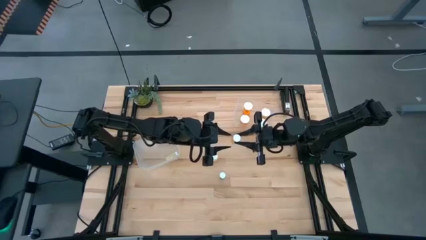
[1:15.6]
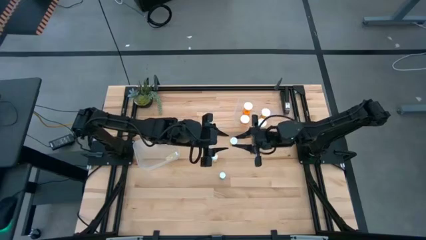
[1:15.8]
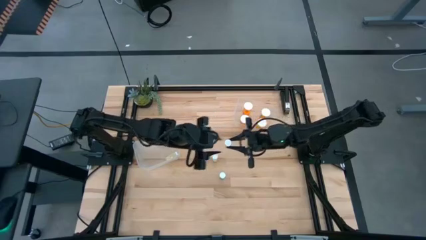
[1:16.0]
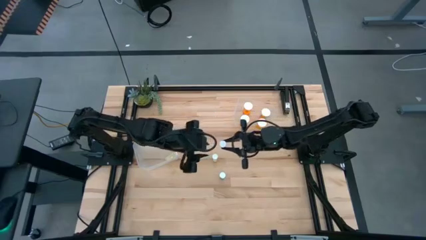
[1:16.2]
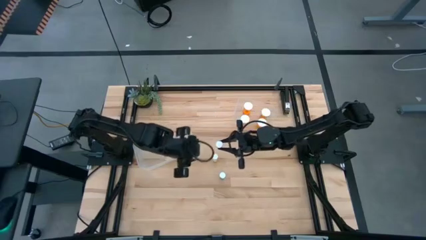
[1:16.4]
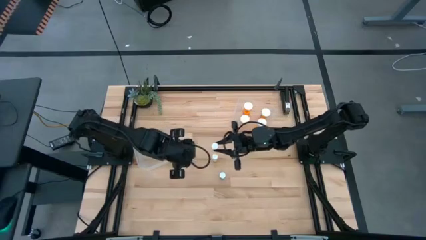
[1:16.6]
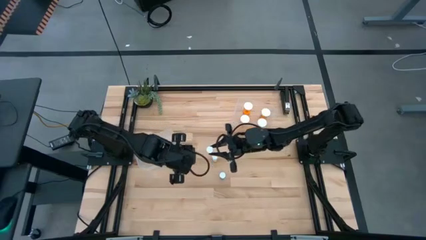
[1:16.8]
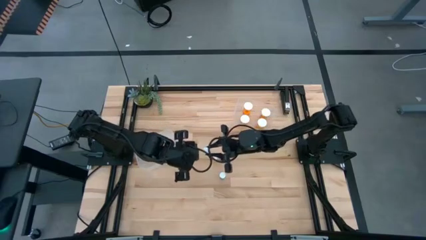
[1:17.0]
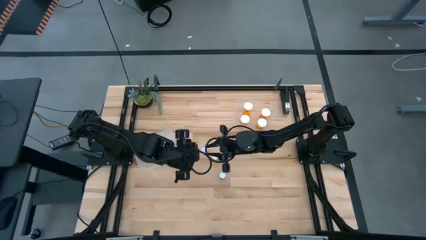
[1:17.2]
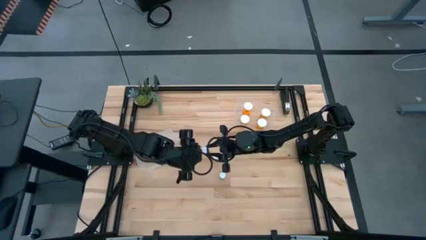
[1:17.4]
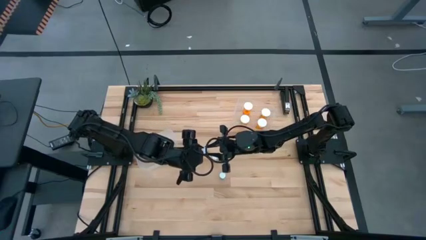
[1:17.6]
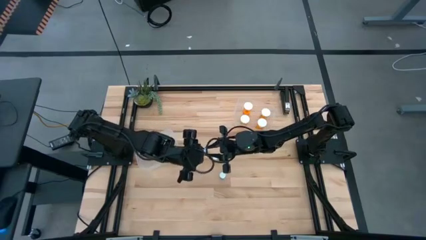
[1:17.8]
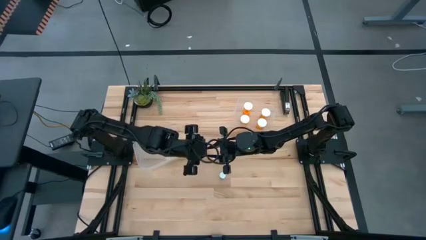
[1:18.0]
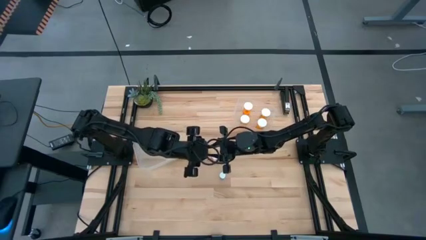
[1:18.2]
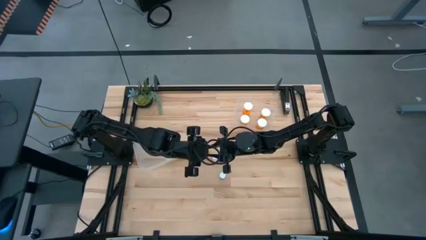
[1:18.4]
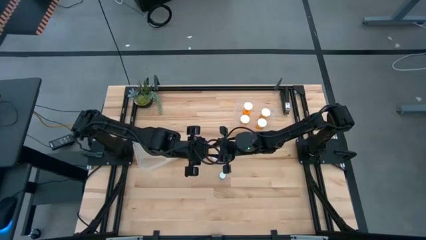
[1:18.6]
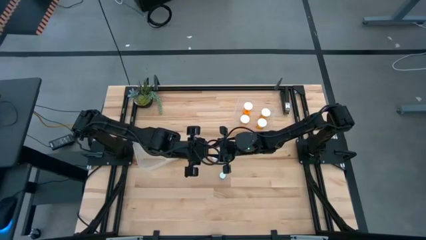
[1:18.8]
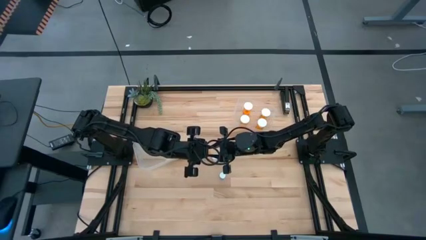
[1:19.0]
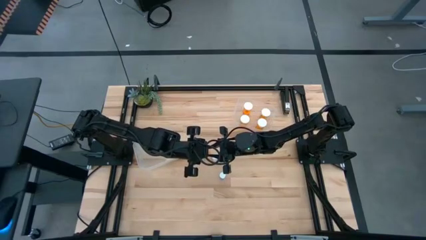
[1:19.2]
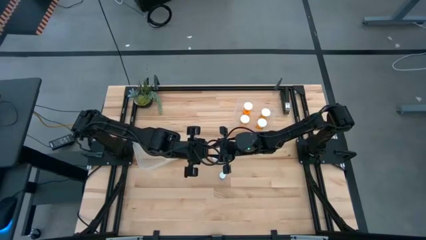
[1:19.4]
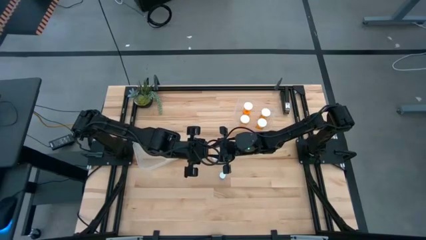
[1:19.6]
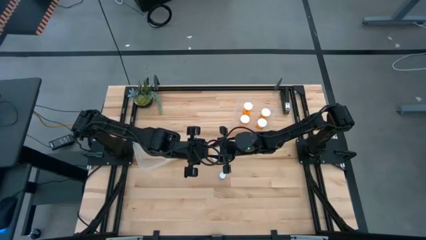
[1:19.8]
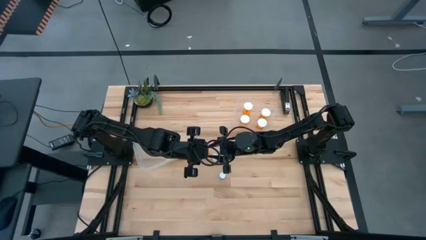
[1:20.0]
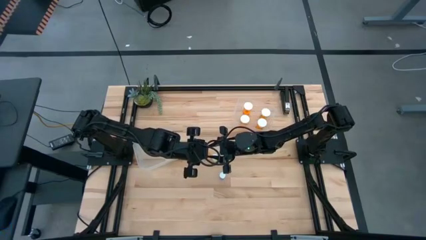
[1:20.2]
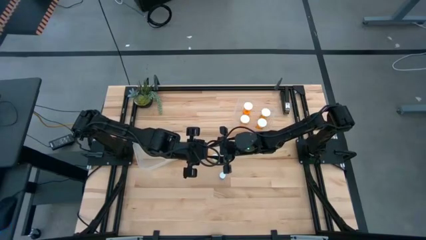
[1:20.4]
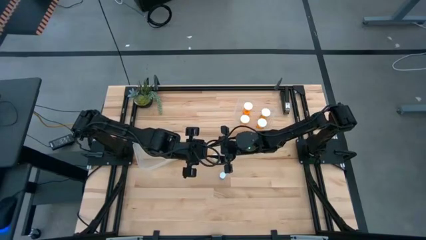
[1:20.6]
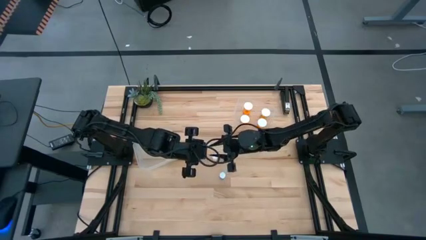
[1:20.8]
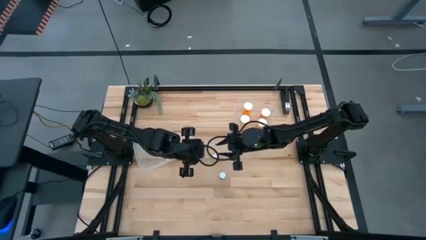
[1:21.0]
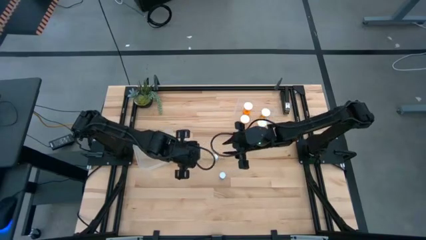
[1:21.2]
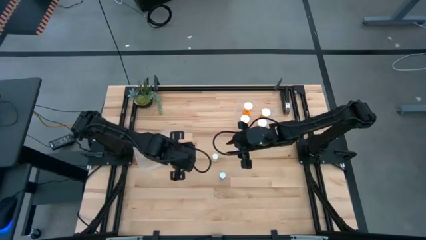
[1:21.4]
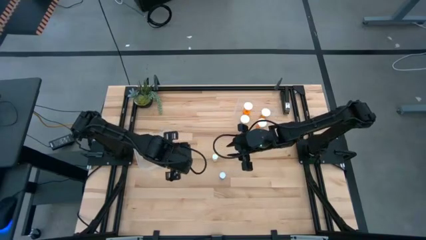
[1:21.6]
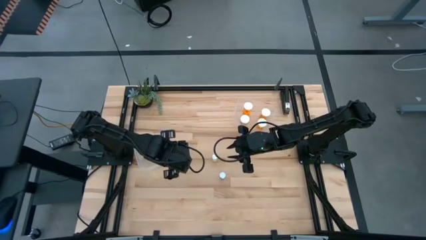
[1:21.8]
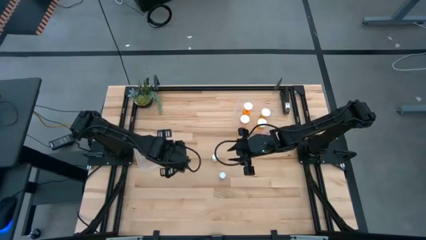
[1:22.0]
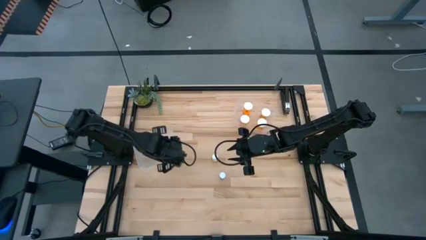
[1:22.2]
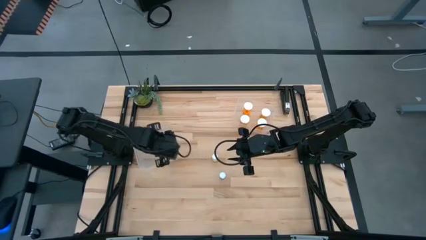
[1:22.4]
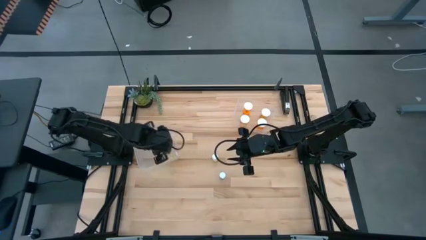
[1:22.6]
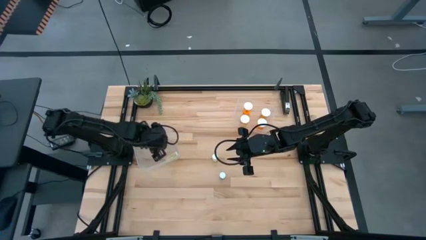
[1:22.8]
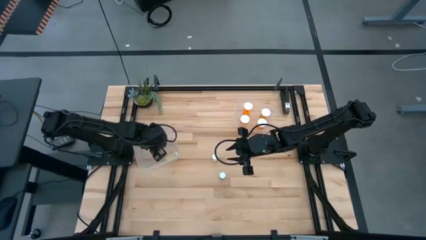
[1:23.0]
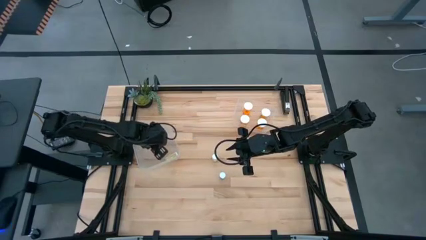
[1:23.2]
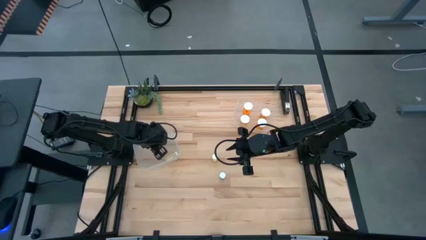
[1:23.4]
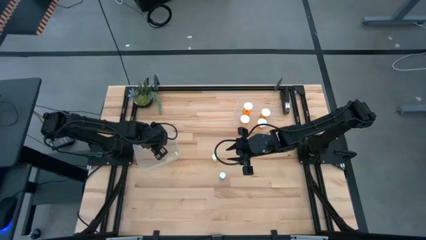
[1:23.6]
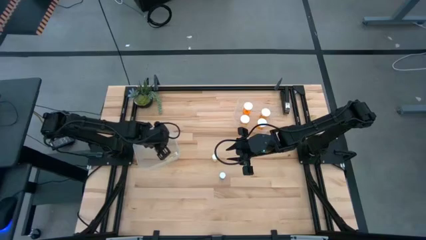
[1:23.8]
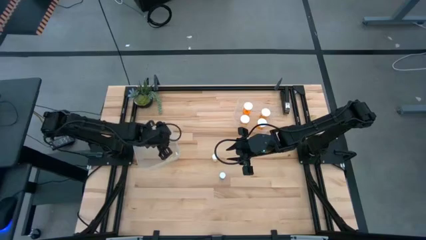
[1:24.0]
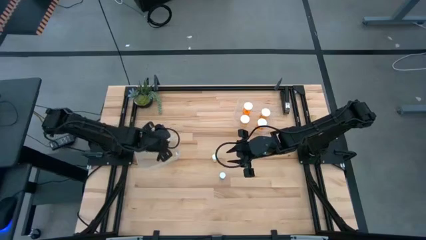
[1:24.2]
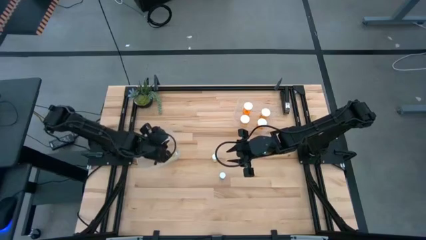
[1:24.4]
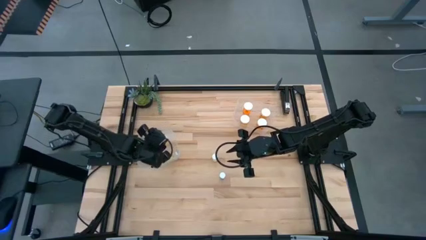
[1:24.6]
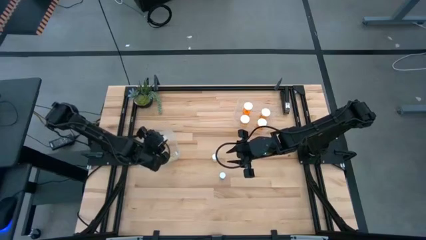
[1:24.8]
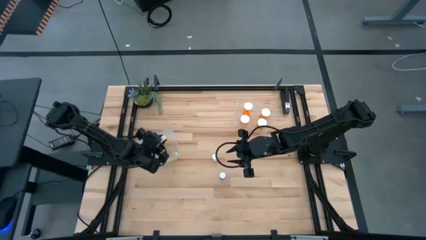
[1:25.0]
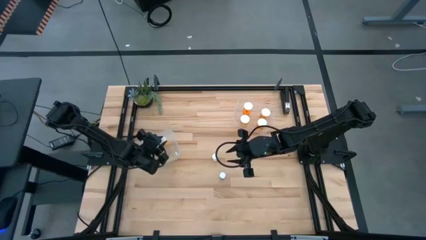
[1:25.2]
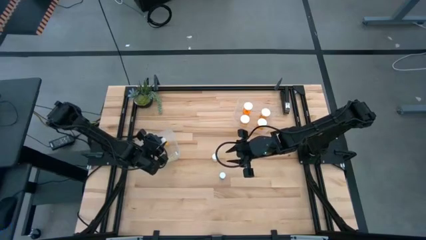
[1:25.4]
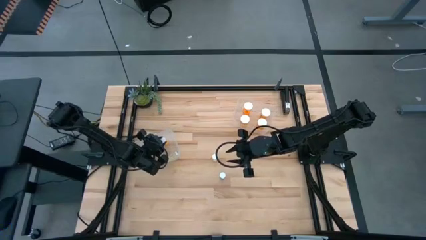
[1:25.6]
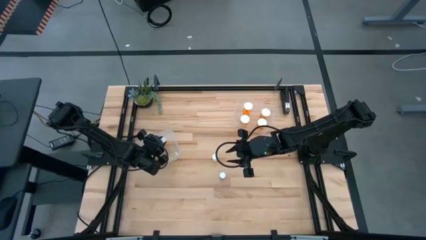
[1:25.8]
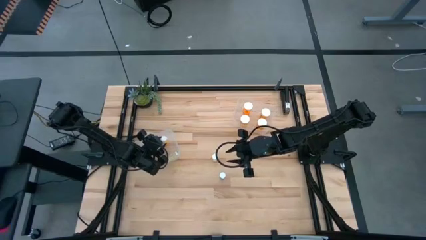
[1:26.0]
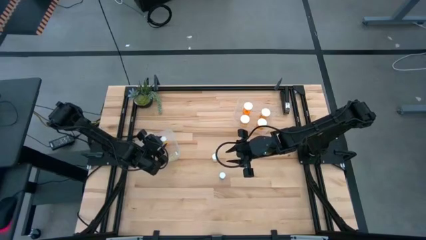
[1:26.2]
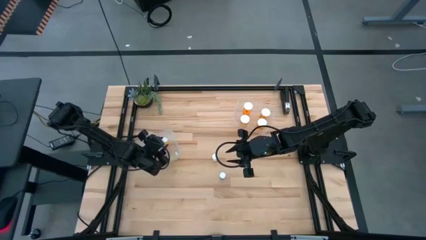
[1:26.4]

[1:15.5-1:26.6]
Task: Pick and place medicine bottles into bin by pill shape (circle, oval)
Adjust the small orange pill bottle in the left transparent bin

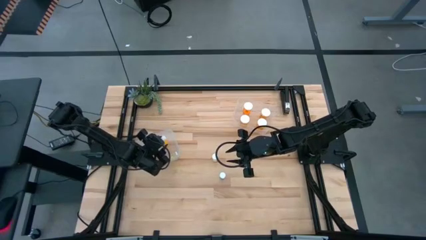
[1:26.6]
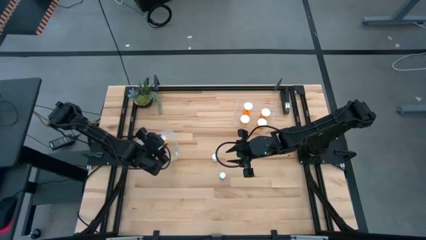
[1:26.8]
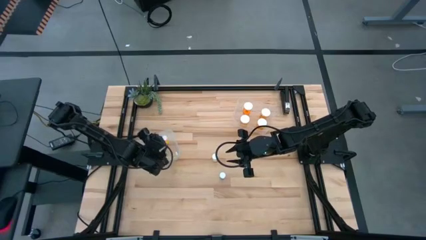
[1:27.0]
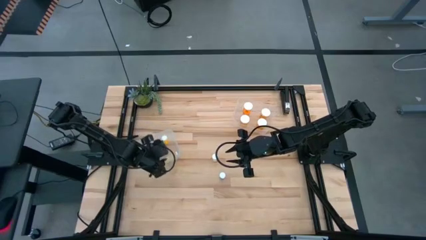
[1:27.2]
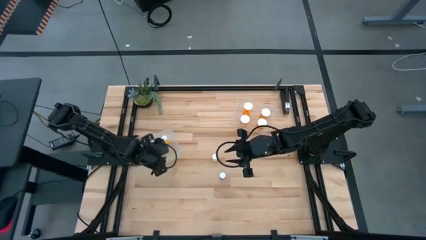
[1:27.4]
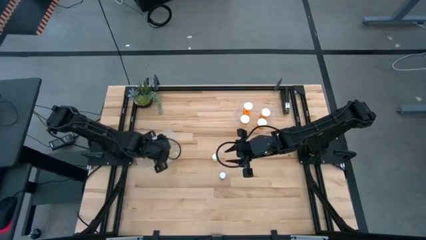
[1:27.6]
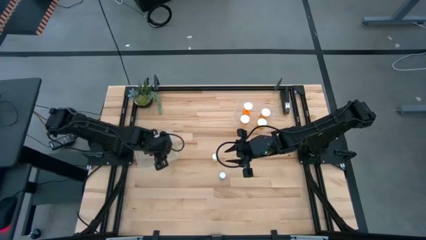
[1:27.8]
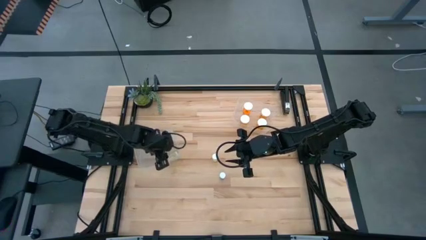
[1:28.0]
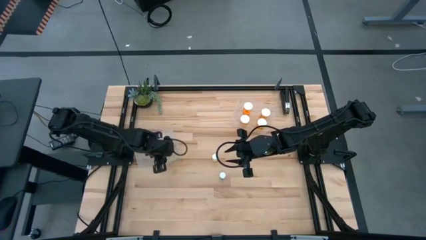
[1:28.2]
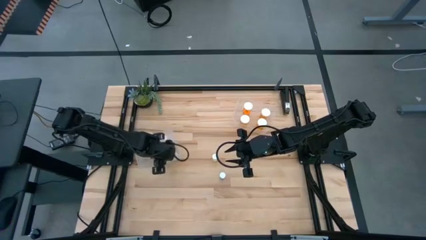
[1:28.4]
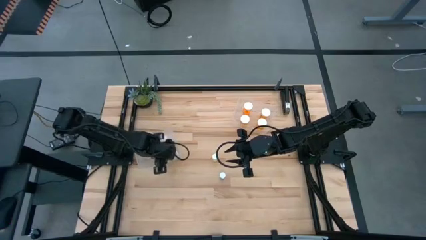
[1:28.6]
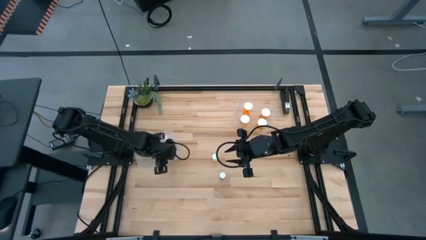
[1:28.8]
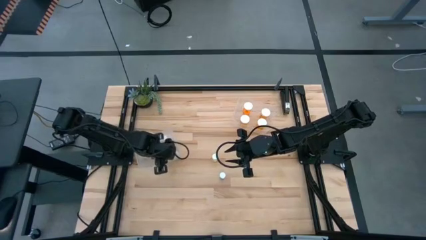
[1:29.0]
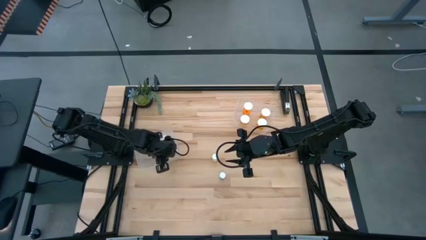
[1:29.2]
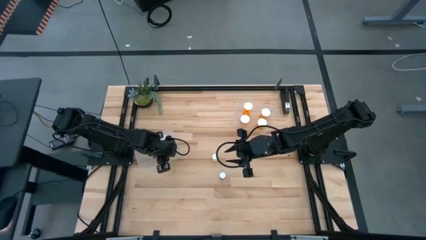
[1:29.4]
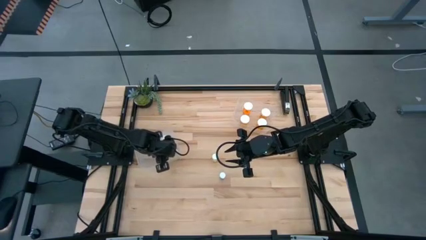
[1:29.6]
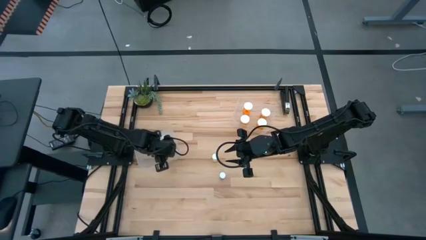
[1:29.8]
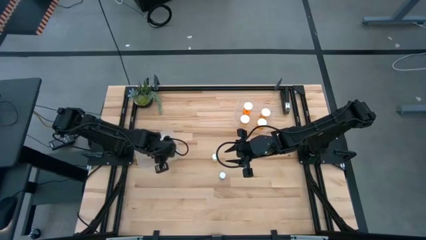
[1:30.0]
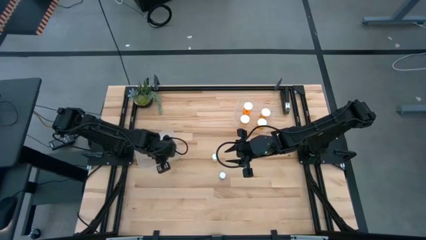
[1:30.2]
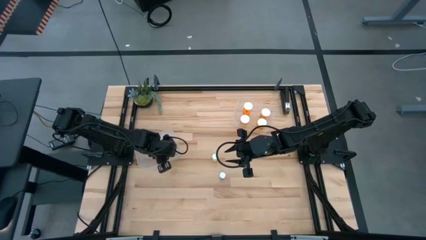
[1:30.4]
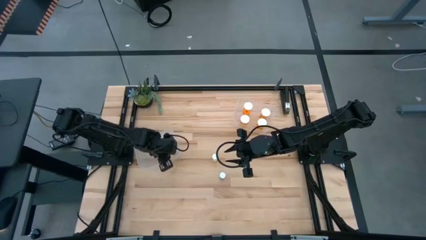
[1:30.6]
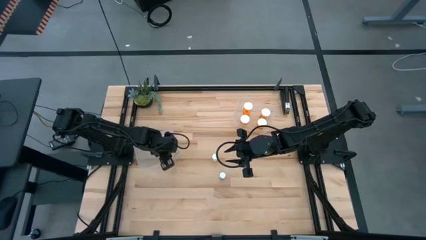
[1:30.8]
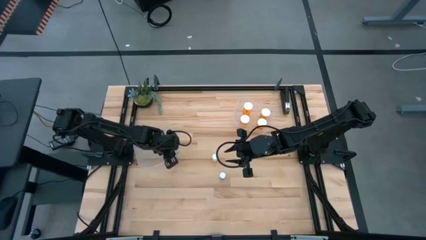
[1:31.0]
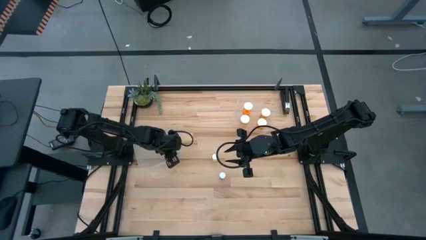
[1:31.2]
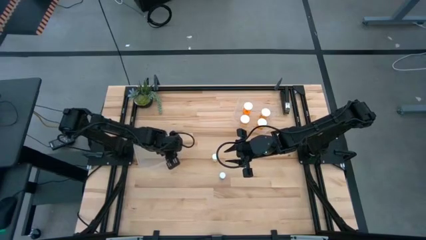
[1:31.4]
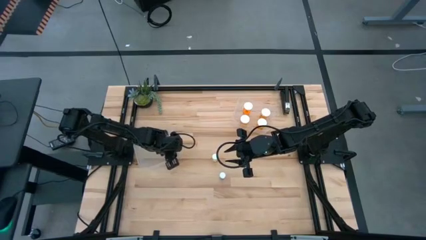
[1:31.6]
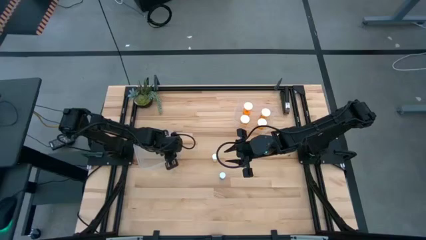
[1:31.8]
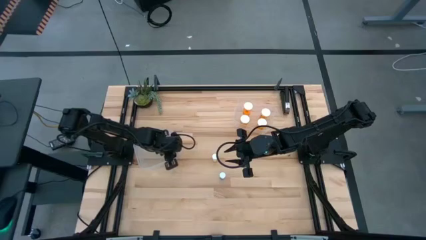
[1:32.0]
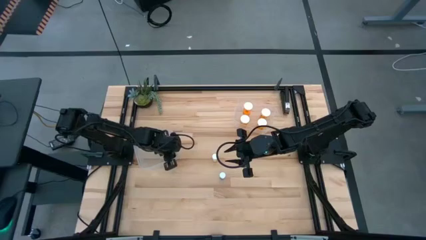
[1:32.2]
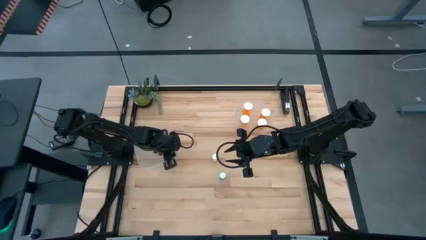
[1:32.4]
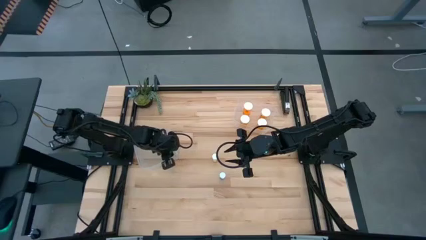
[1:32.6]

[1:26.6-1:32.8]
Adjust the small yellow pill bottle in the left transparent bin
